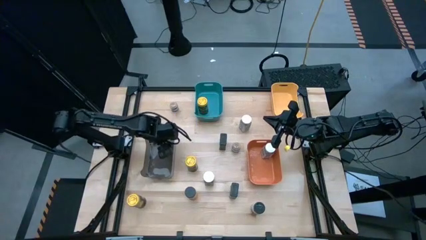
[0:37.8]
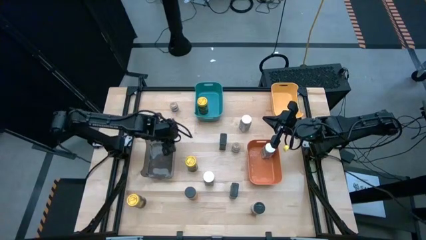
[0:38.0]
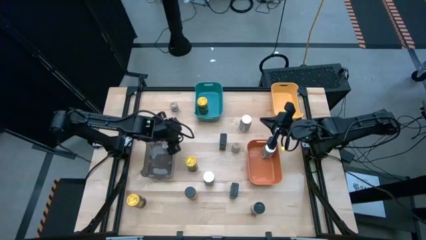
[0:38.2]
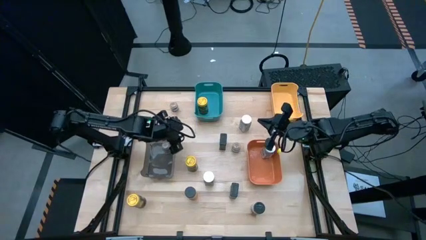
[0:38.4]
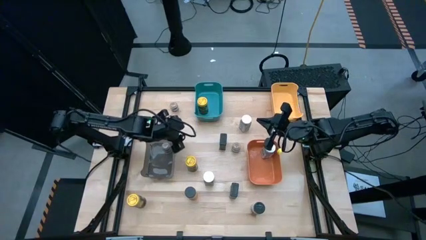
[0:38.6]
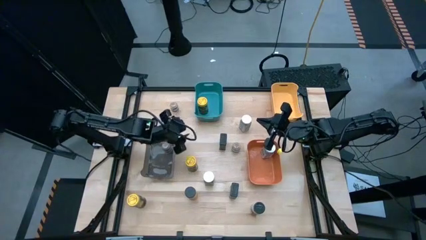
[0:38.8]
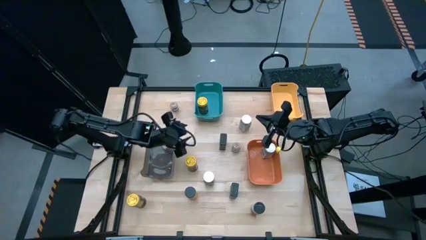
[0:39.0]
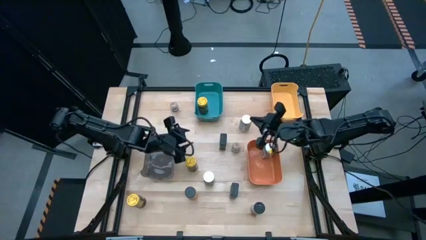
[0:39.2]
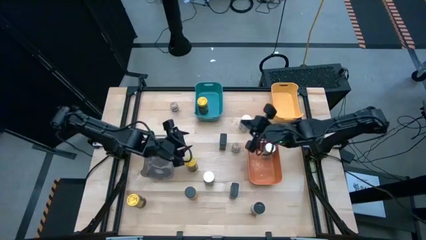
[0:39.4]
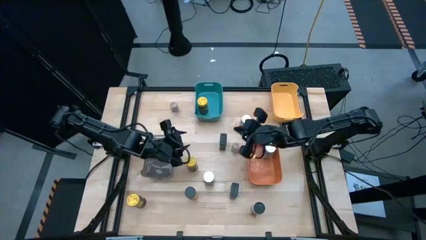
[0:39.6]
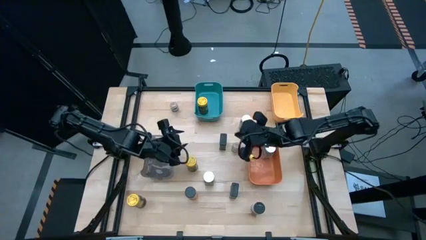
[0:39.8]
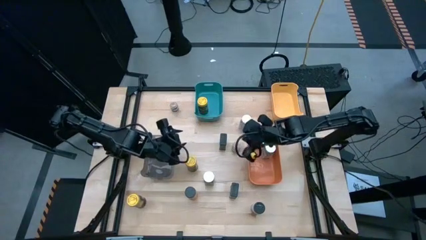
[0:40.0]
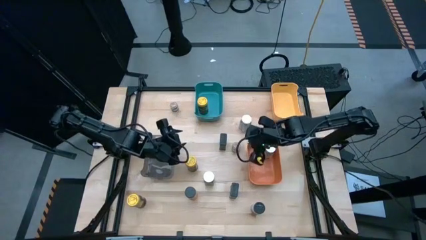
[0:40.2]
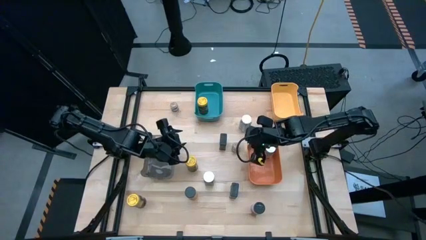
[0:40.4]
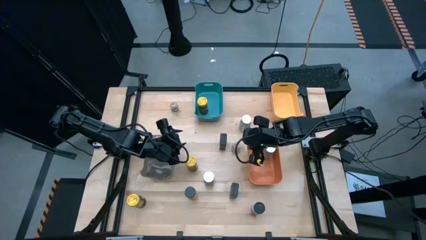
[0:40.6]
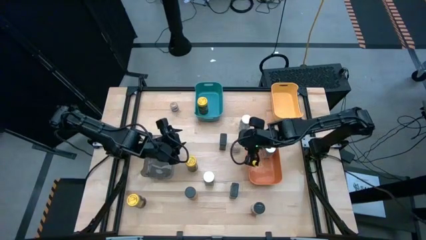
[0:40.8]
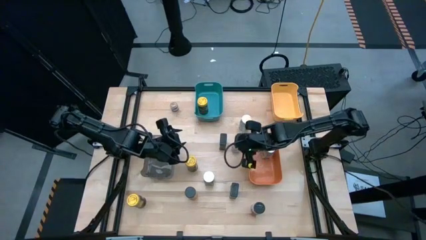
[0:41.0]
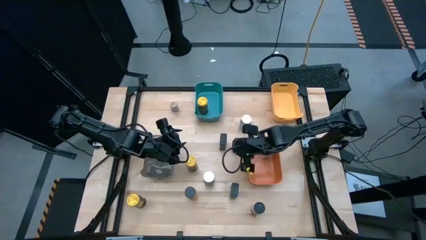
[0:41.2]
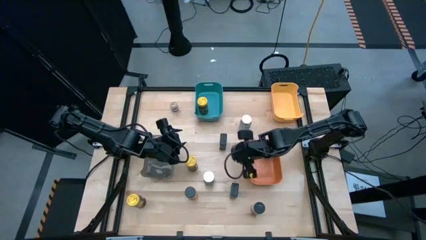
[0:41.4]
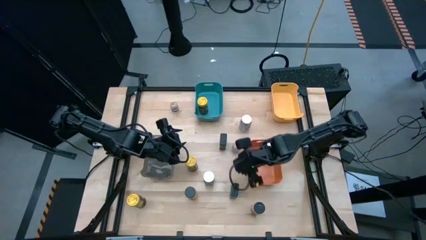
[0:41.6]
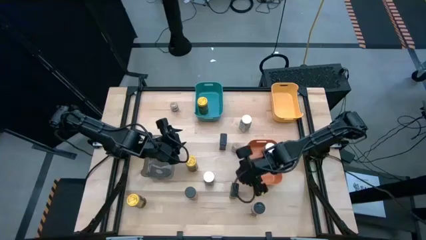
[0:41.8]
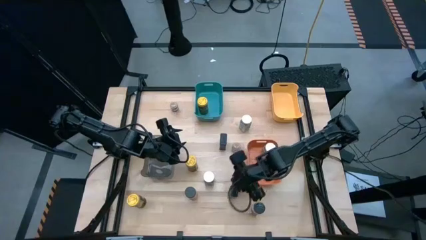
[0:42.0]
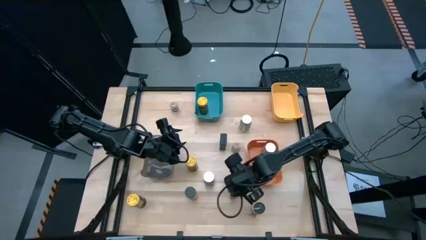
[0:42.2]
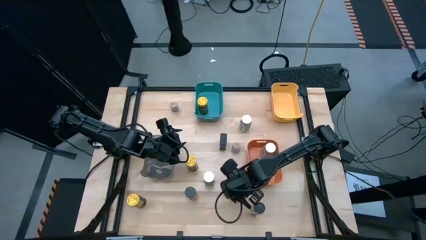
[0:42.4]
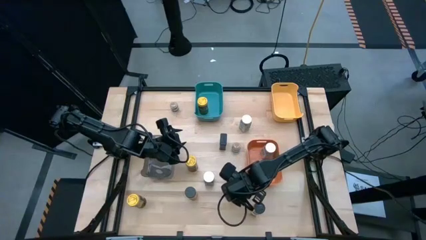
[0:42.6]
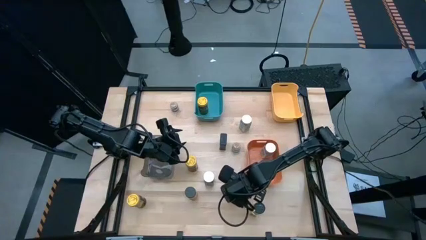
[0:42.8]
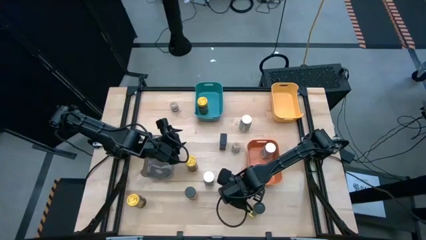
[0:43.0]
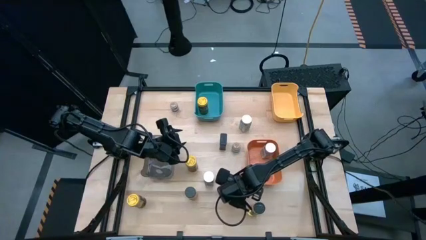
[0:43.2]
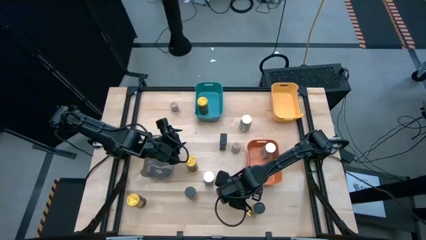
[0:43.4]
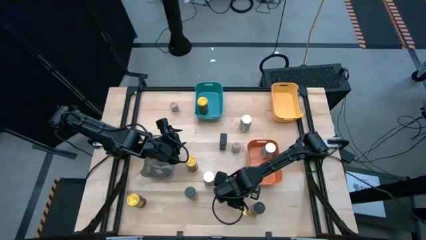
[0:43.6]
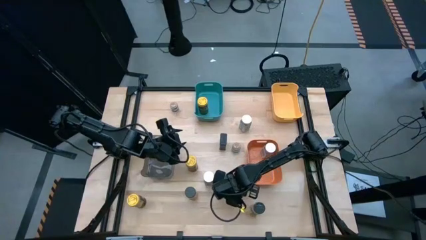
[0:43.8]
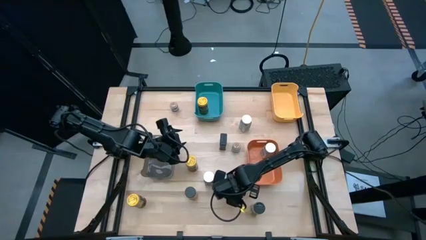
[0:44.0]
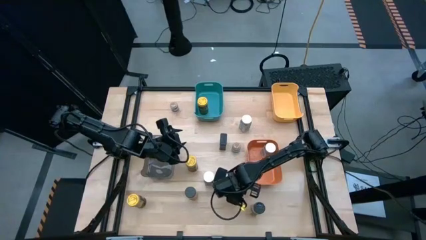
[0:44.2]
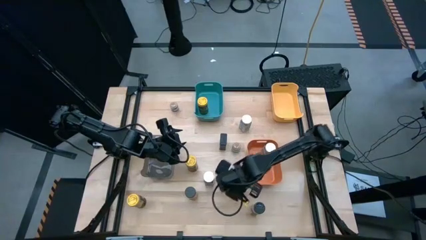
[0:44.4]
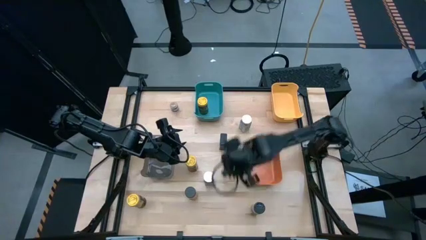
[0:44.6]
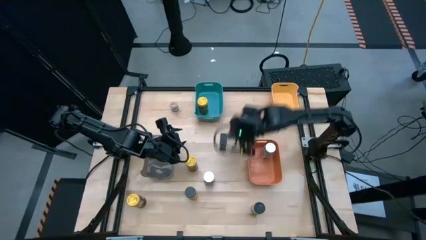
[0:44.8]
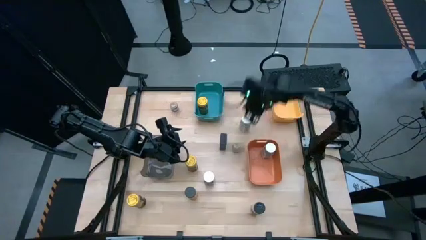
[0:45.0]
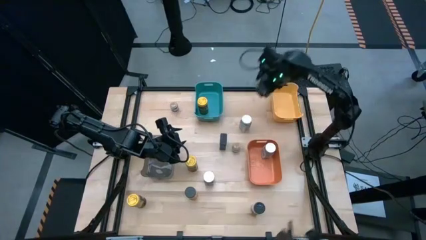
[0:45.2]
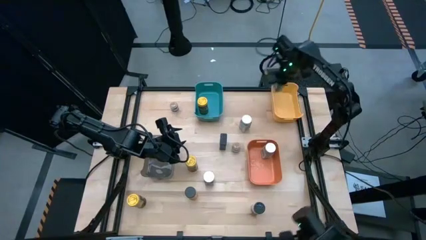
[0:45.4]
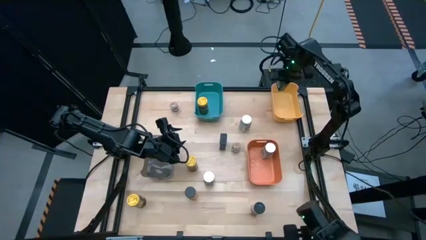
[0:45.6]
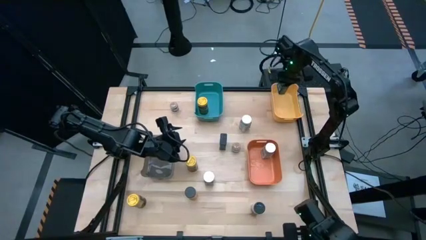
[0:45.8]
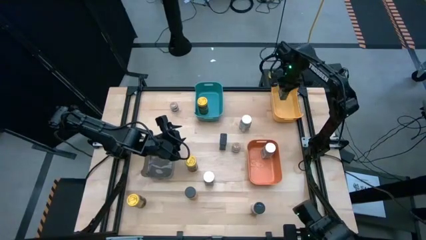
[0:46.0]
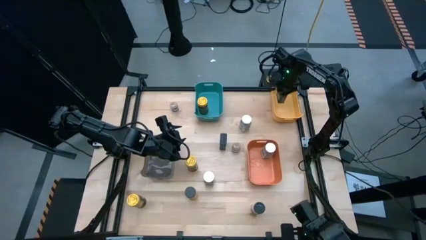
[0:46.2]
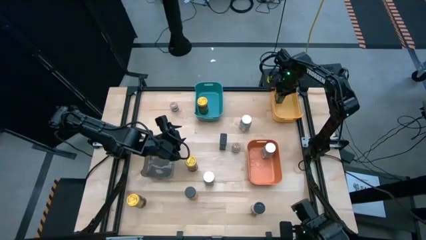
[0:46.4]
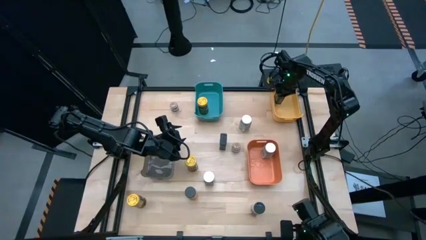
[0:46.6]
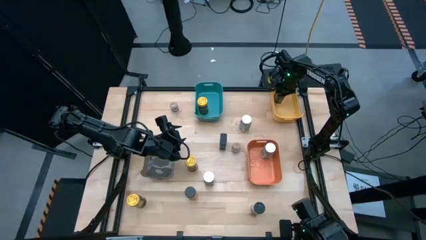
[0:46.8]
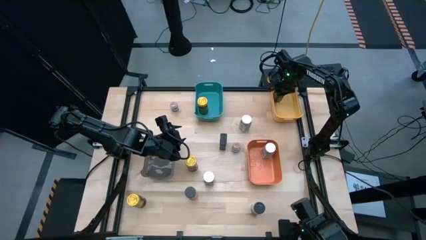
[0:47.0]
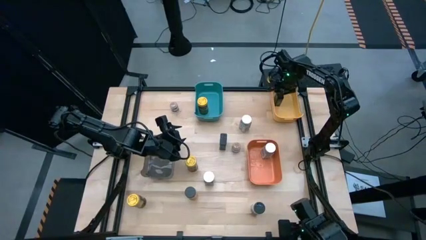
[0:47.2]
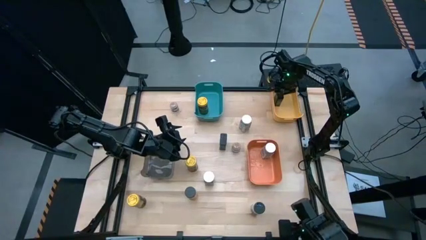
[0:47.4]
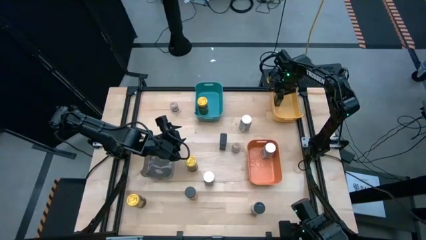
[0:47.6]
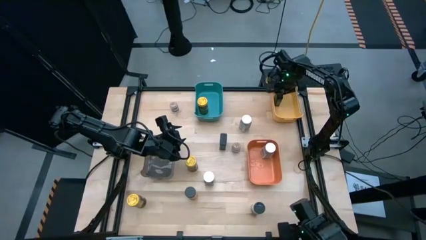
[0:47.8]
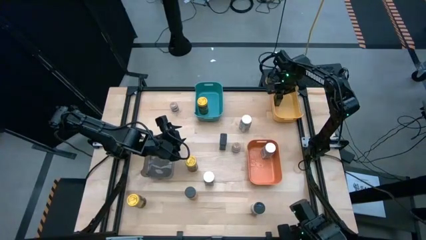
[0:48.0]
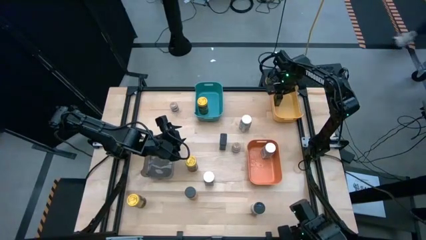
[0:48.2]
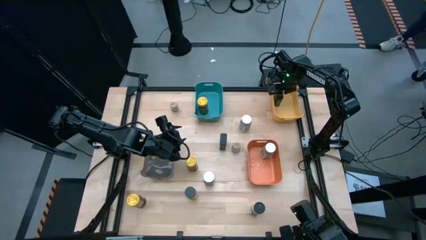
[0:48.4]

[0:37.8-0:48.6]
Task: Sort spices by type
Put the bottom black seasoning can into the yellow bin

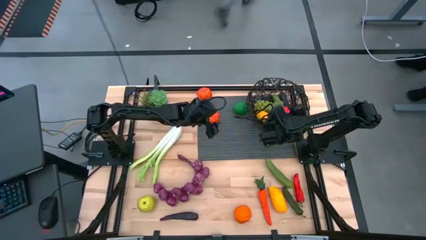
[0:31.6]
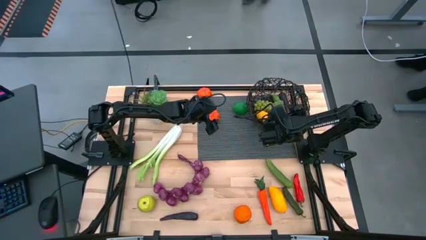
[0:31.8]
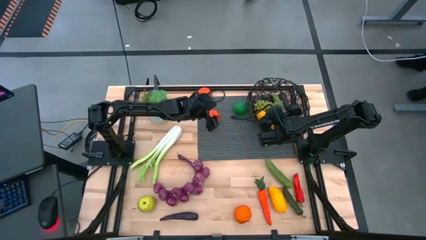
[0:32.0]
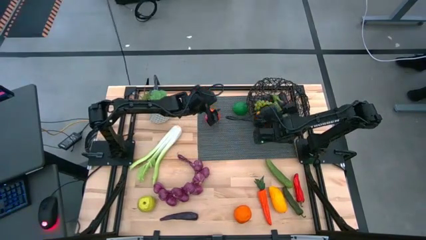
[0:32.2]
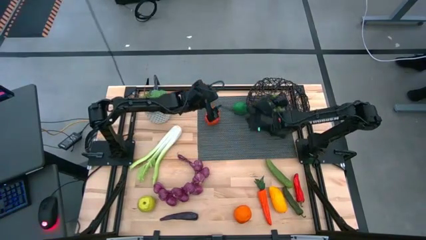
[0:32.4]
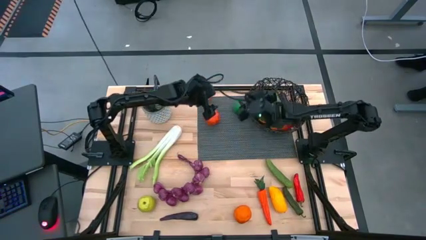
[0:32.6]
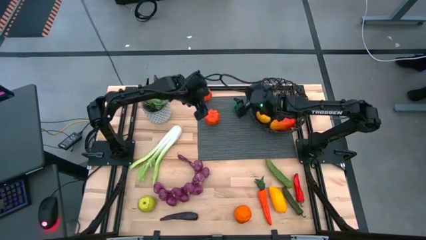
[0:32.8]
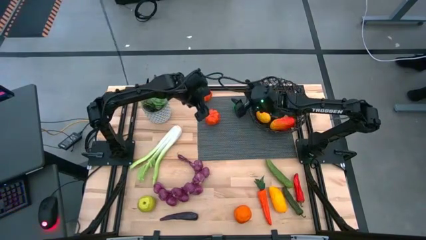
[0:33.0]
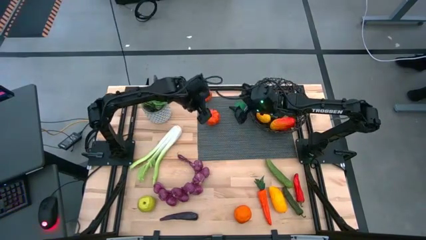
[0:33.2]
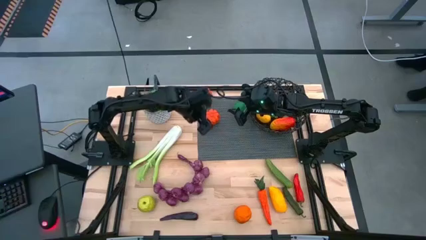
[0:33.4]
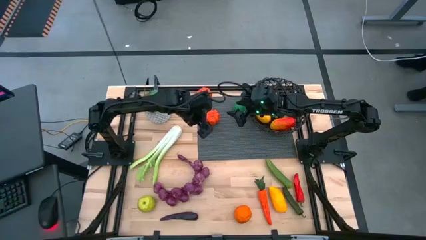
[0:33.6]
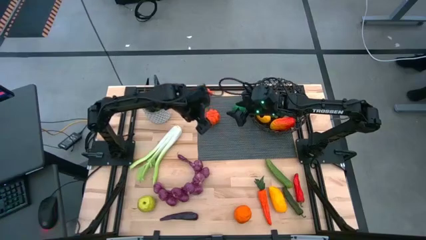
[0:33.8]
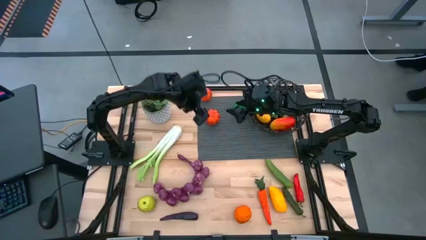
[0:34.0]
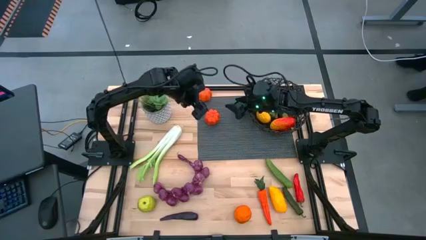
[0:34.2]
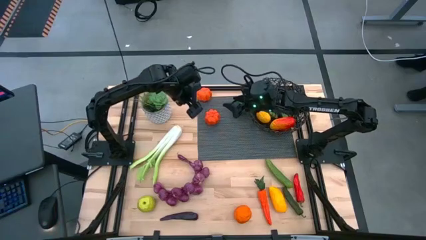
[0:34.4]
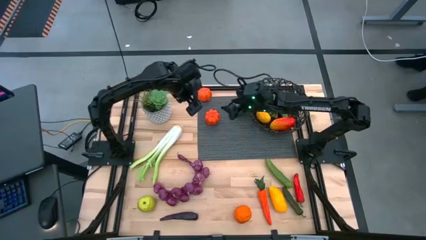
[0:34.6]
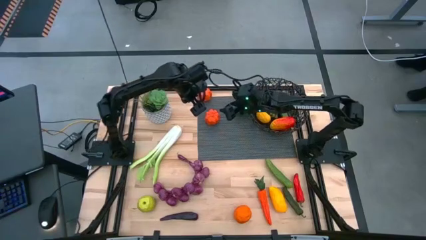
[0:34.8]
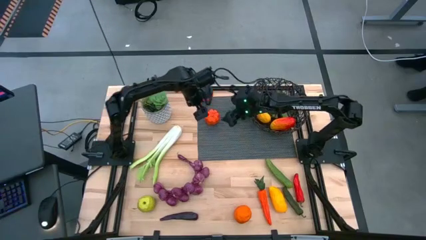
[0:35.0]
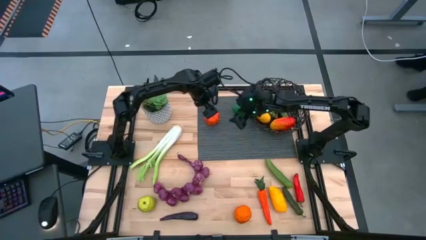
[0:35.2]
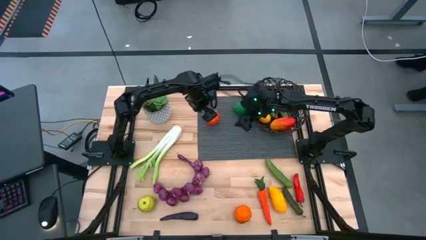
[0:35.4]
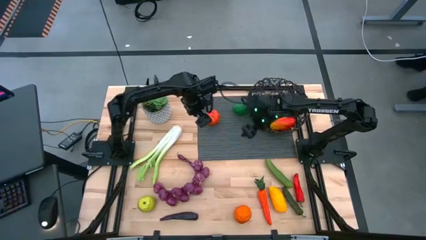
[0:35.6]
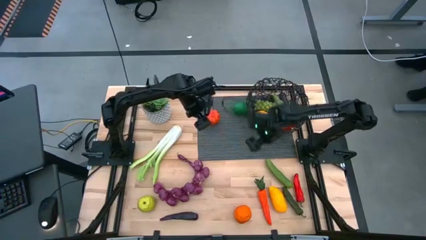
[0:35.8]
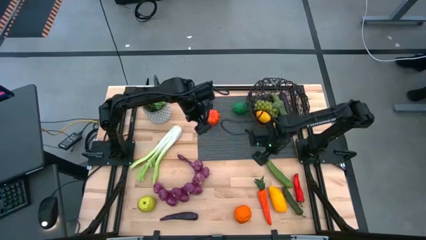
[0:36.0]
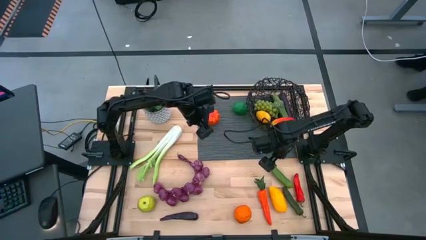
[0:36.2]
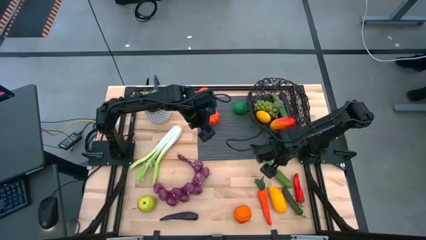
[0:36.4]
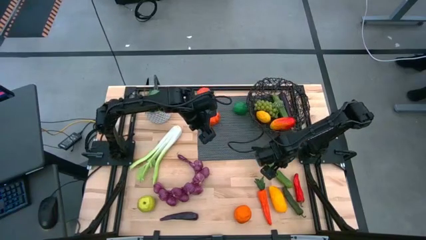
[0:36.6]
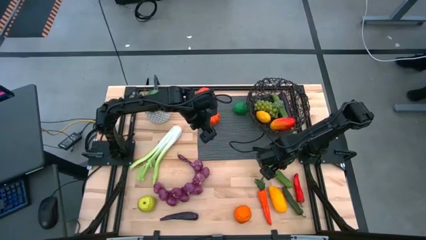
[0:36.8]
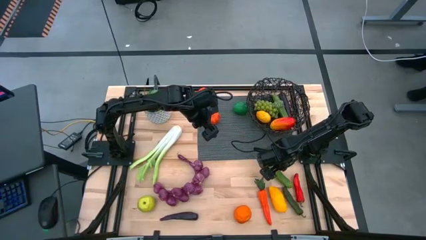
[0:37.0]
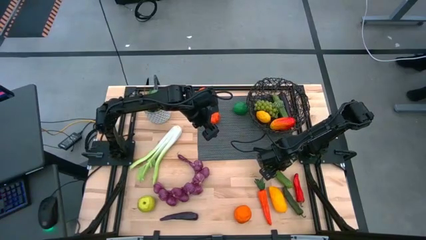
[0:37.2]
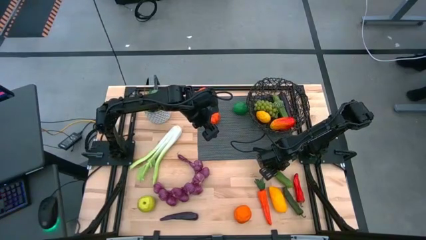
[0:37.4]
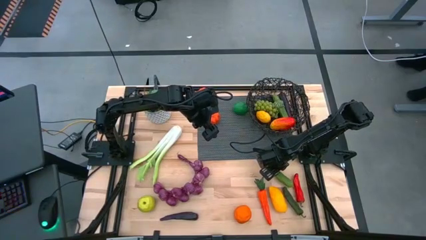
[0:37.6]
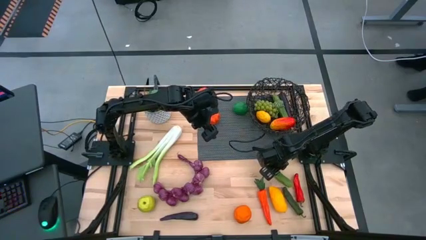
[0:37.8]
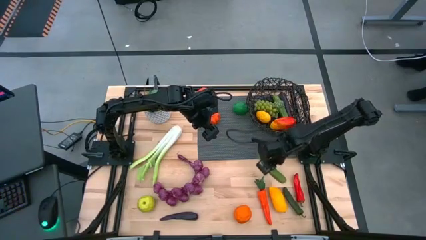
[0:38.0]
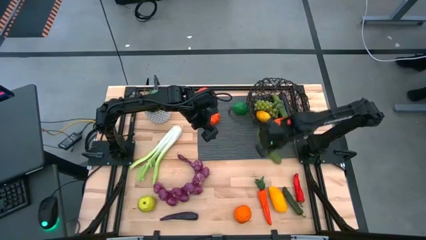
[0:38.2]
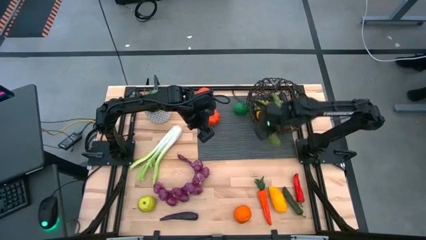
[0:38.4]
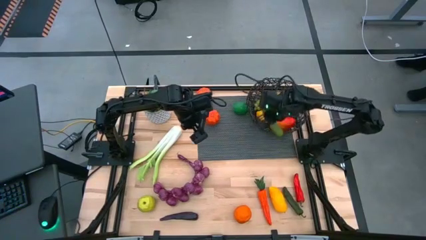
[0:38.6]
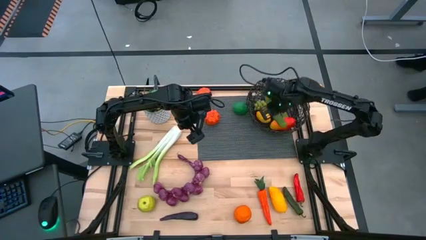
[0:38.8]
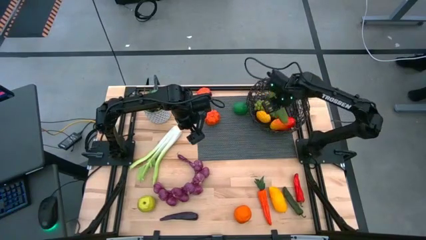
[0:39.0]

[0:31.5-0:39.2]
Task: Build produce basket
Put the green cucumber into the black basket
